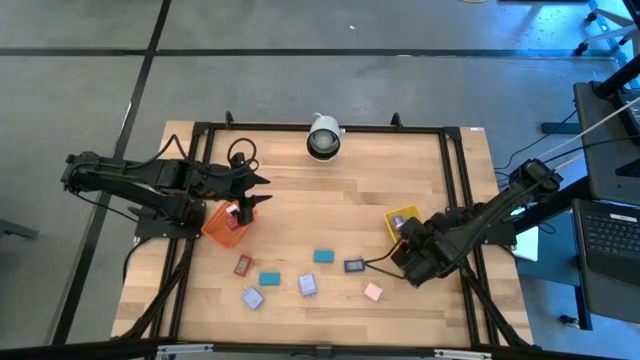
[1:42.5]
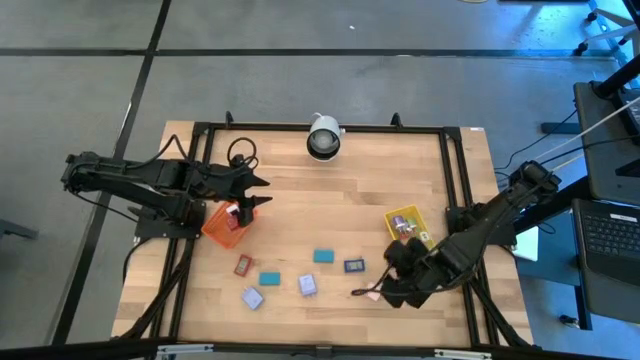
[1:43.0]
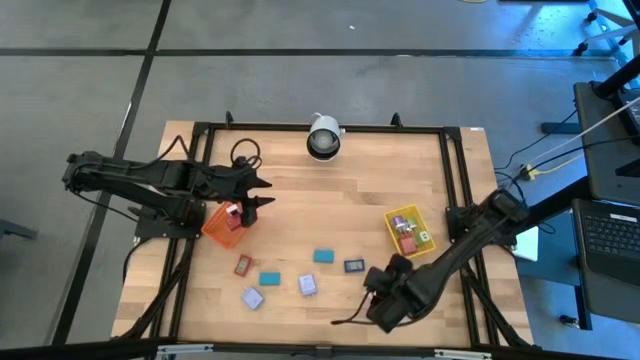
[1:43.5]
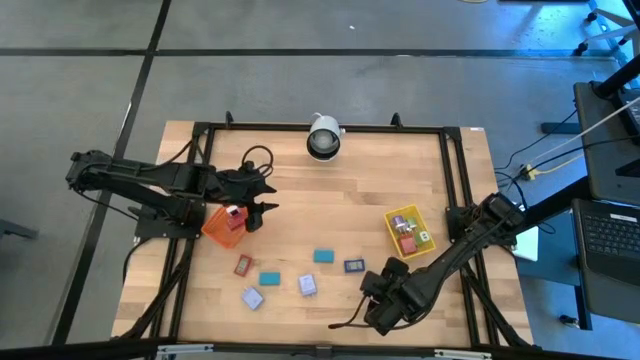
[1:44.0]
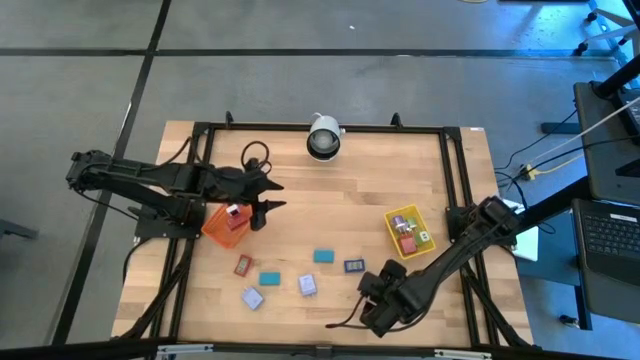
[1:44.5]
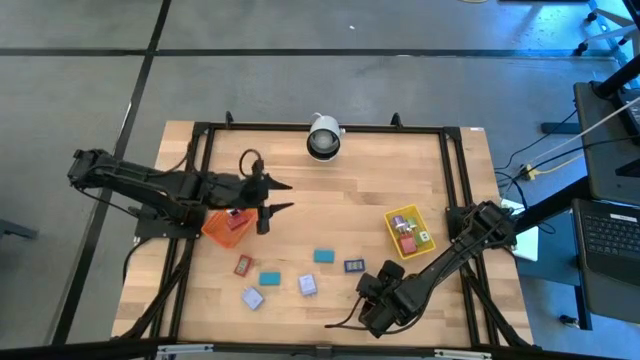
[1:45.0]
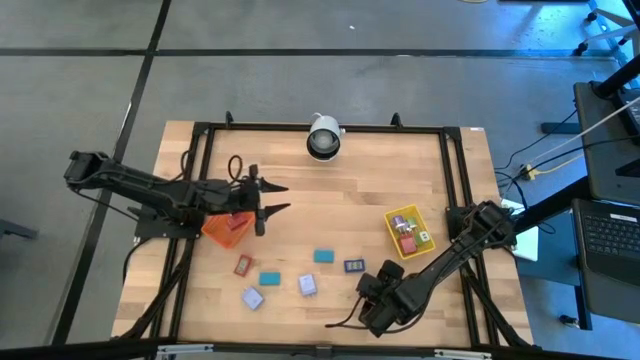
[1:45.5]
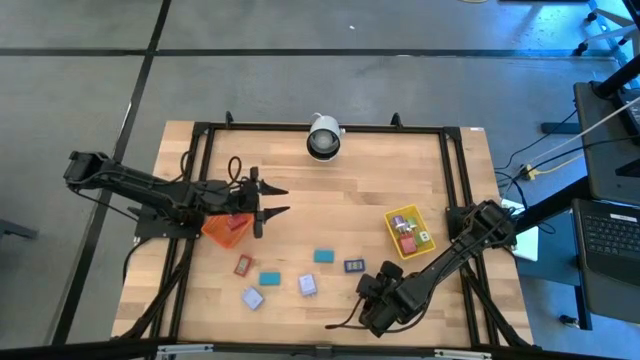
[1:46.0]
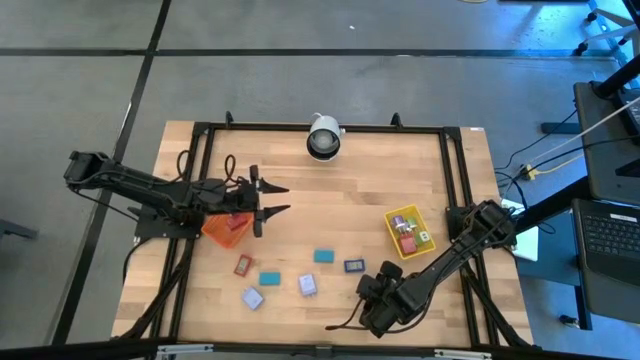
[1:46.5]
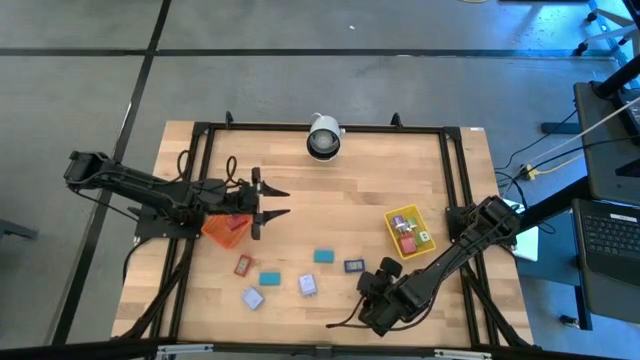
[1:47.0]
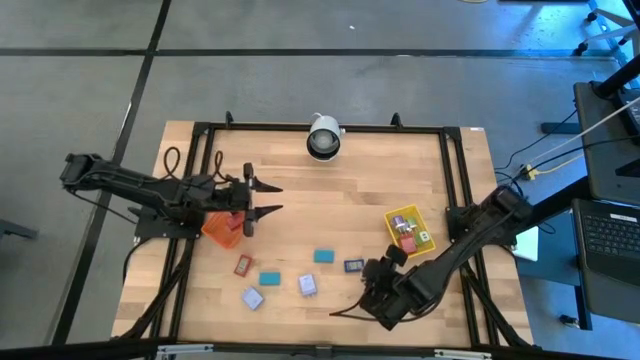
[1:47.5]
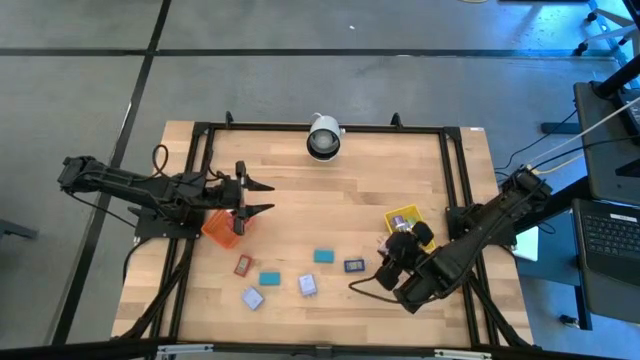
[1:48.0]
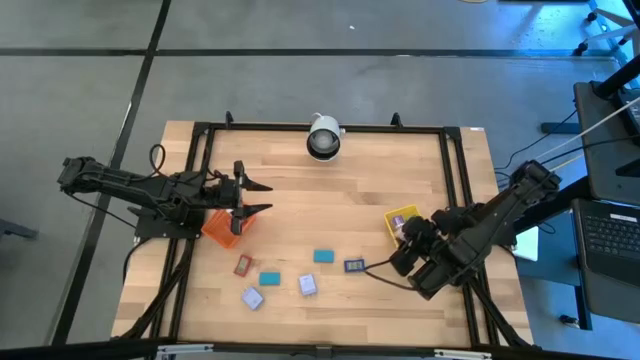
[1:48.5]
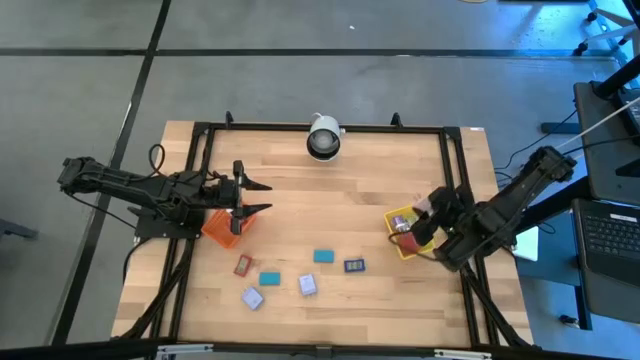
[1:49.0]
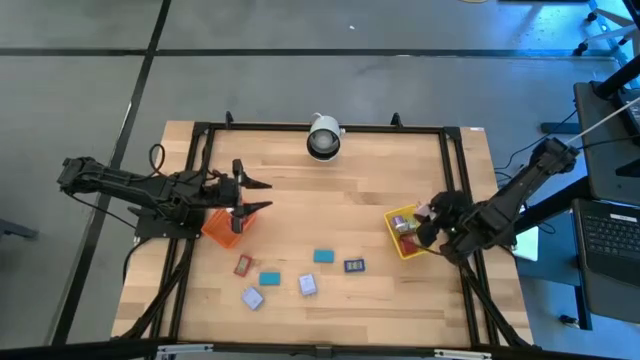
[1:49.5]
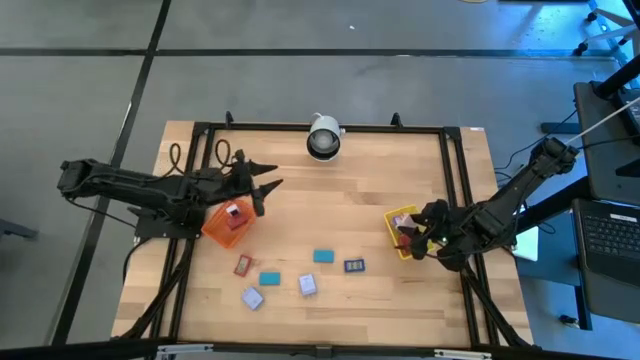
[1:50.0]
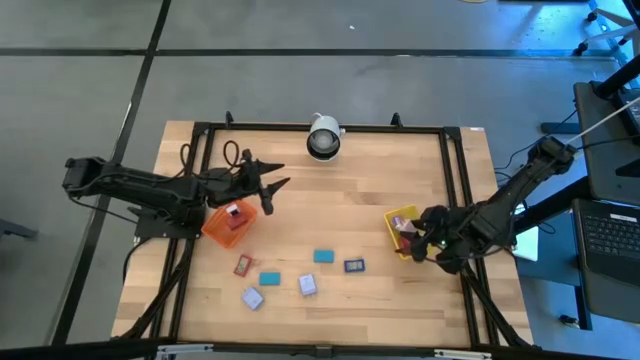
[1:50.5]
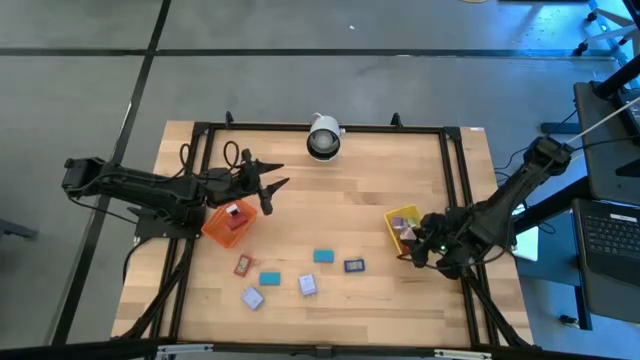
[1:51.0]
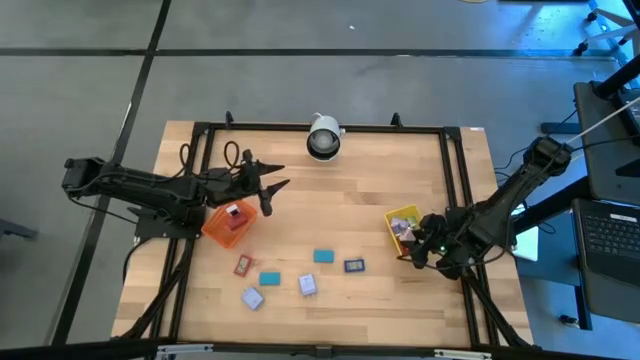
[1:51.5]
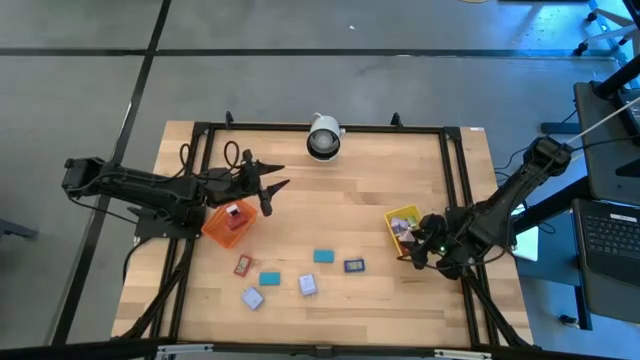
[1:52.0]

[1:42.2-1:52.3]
Task: Pick & Place Office items
Put the white charger adapter into the yellow basket

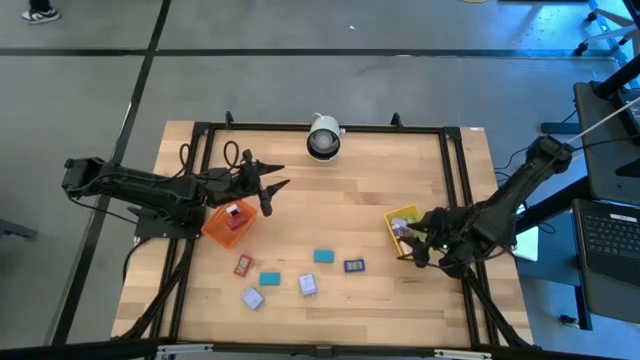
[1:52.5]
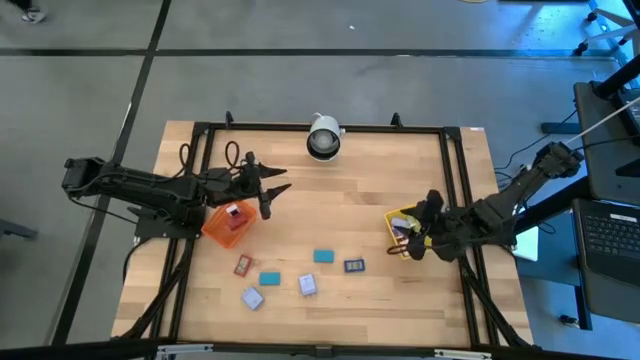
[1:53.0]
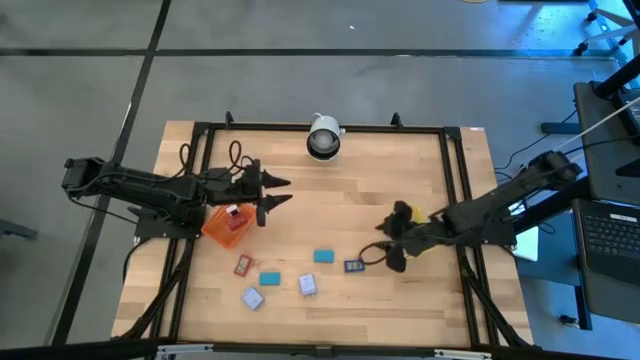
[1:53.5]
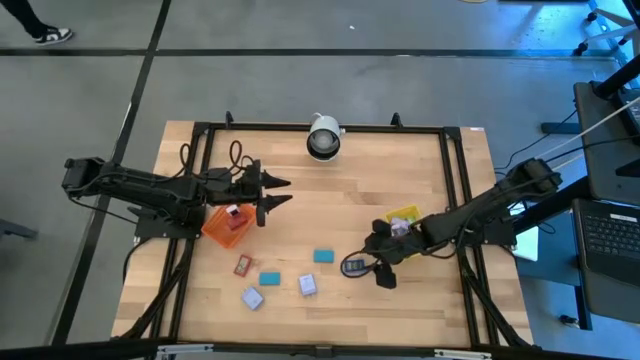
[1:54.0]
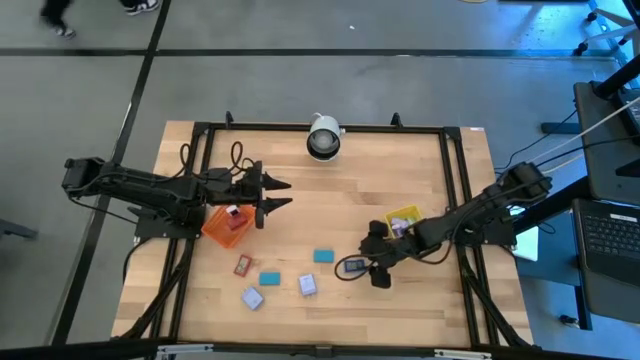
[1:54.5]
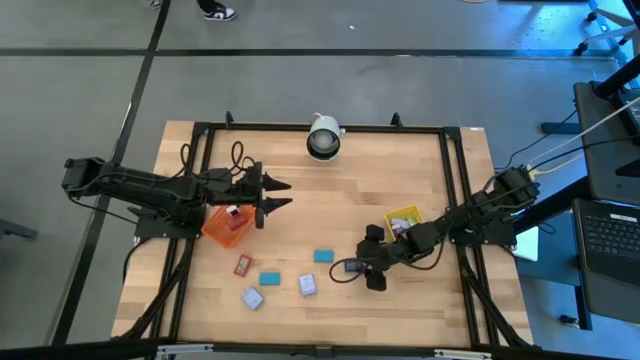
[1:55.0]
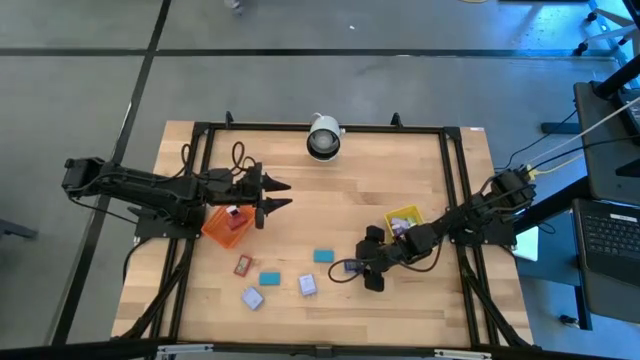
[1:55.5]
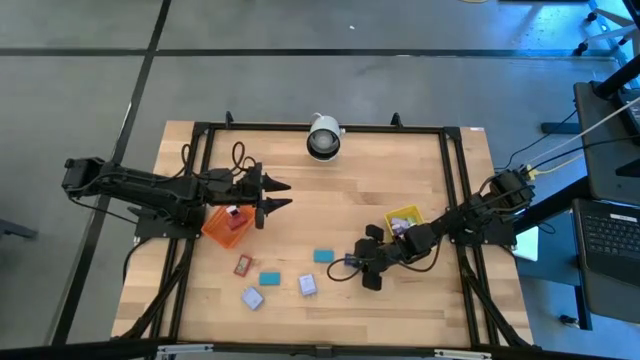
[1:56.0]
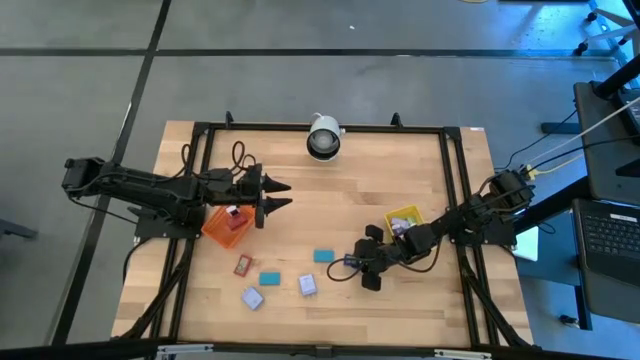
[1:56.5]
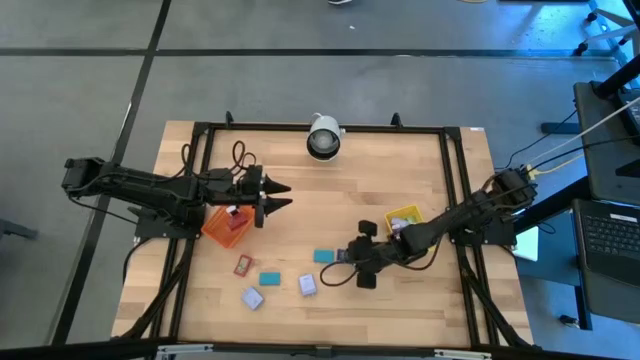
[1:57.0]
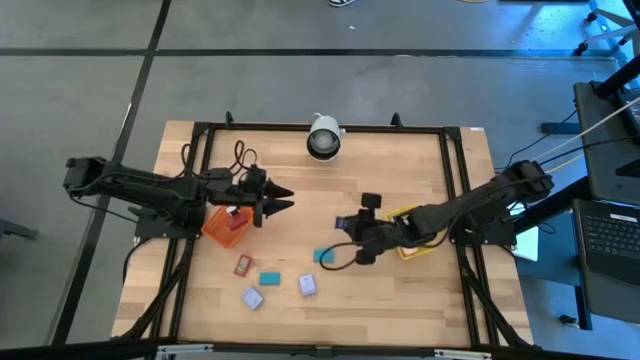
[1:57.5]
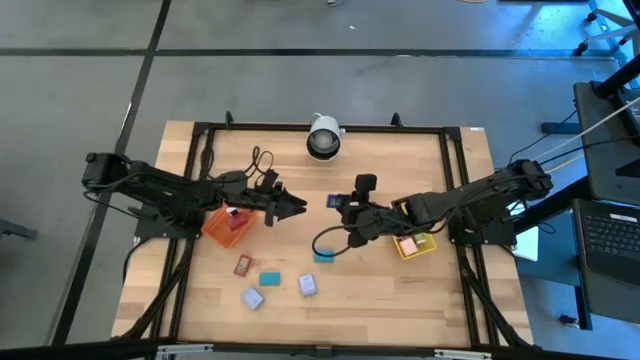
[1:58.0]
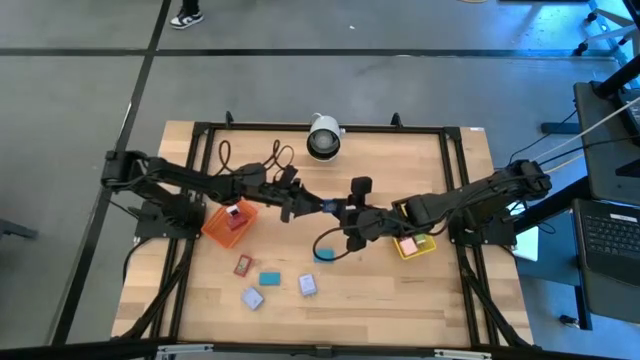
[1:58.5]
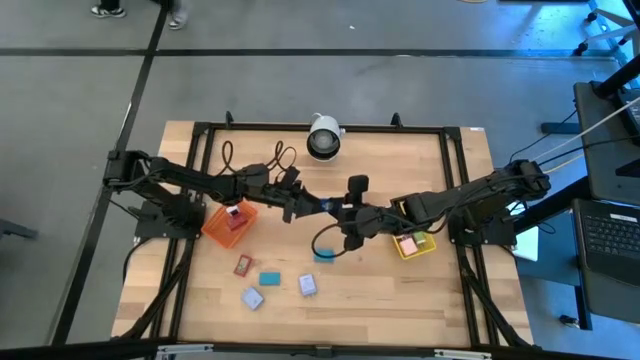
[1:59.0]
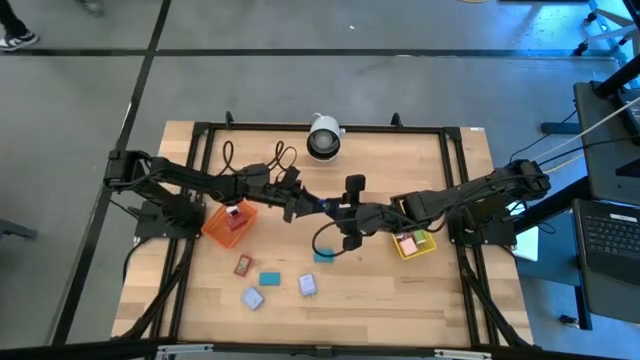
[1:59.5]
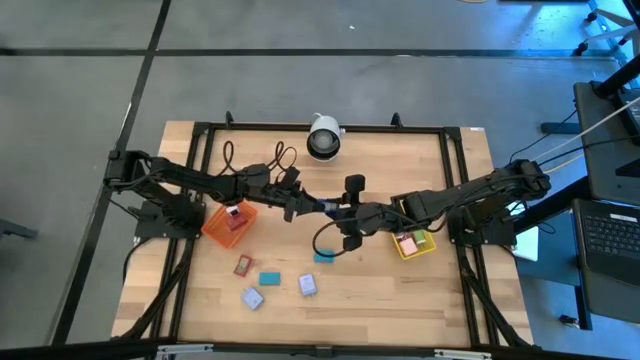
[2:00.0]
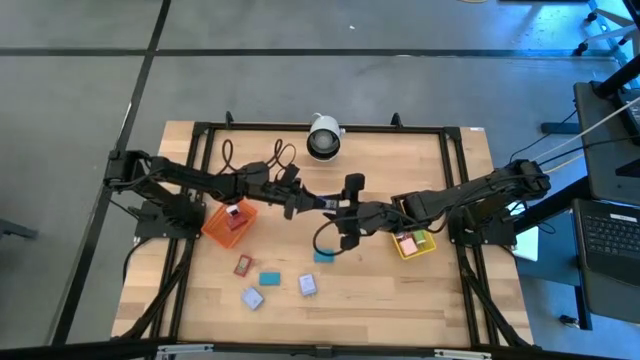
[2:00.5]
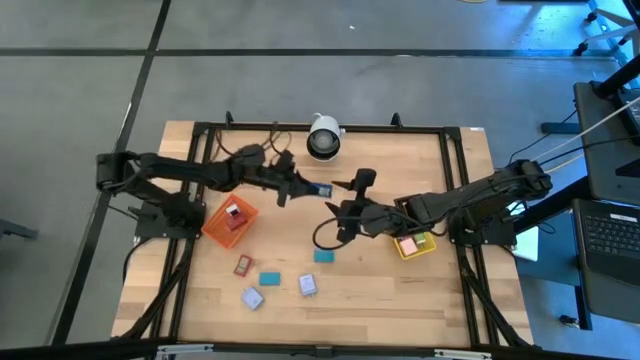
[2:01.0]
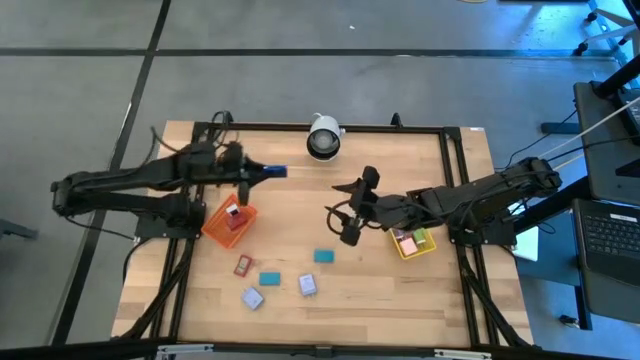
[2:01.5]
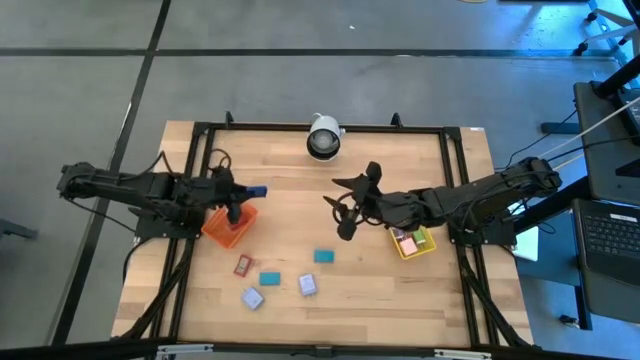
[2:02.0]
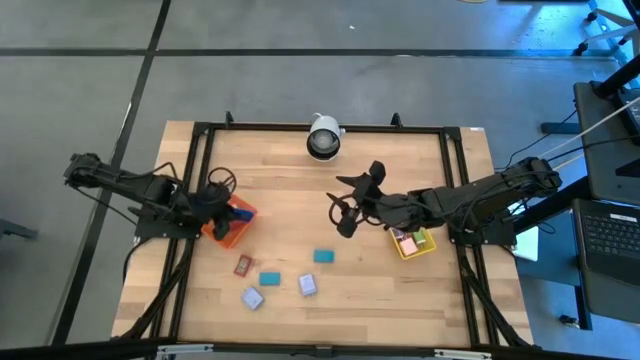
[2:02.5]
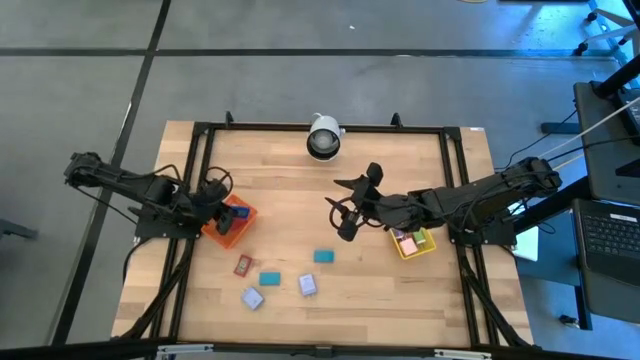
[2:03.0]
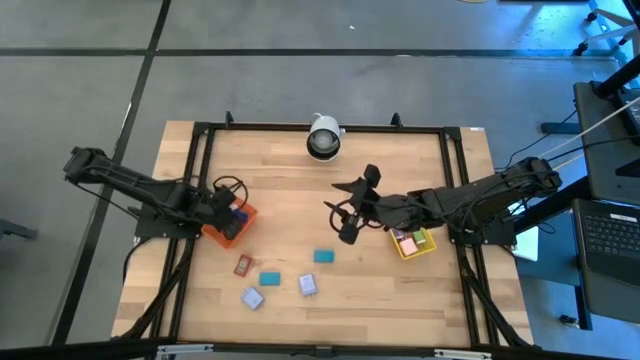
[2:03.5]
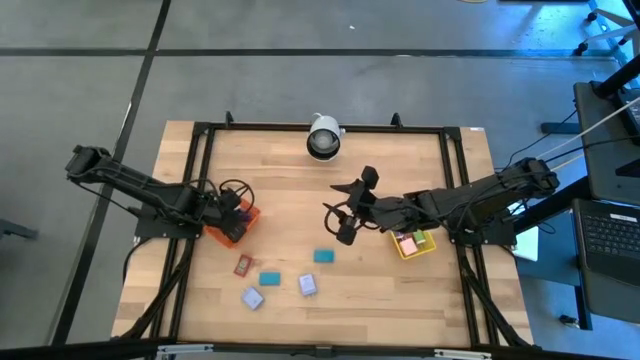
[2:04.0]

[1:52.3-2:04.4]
Put the blue digital clock into the orange basket
